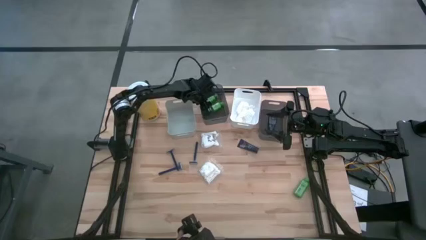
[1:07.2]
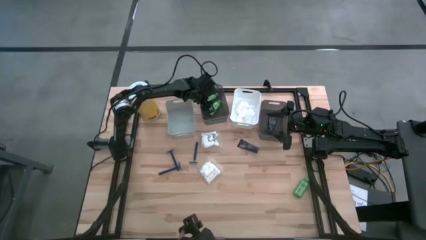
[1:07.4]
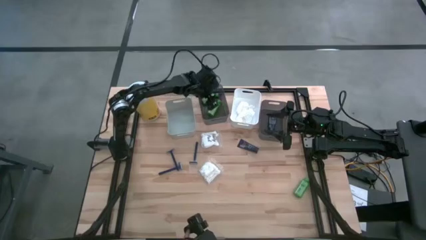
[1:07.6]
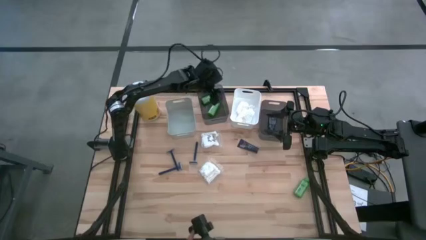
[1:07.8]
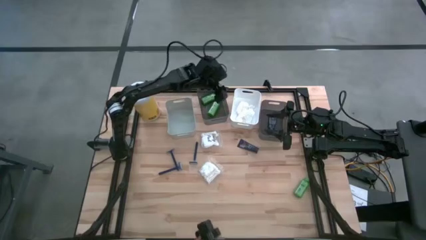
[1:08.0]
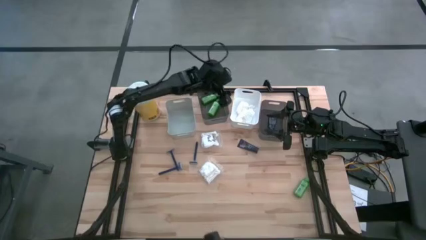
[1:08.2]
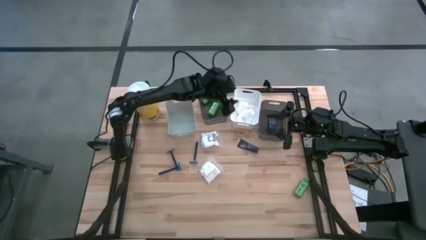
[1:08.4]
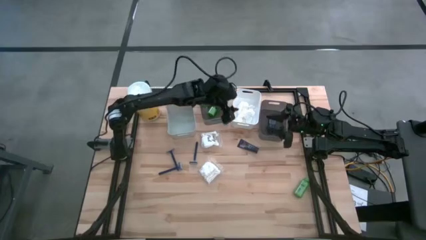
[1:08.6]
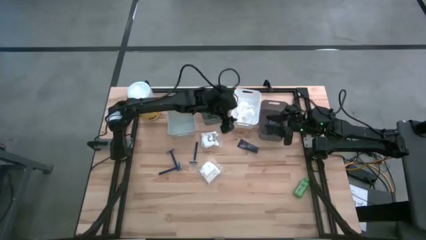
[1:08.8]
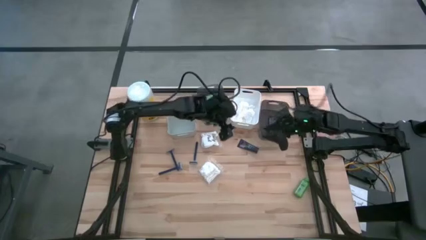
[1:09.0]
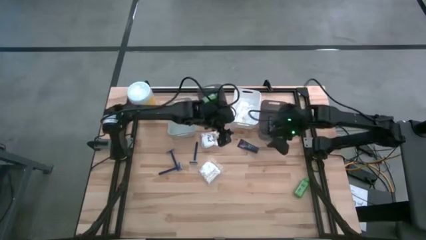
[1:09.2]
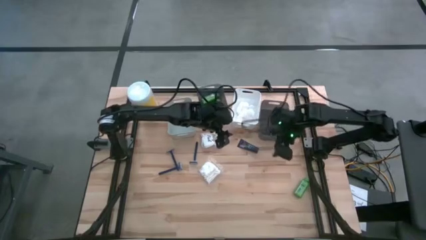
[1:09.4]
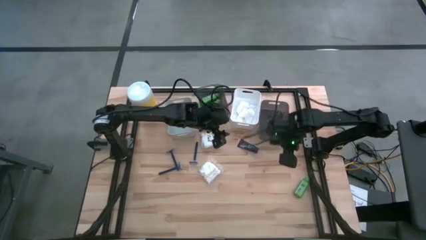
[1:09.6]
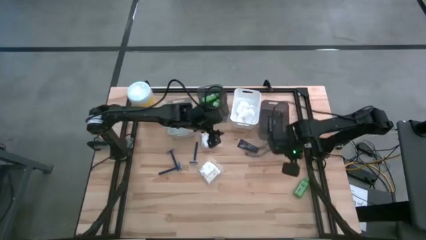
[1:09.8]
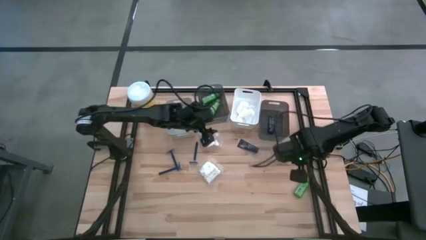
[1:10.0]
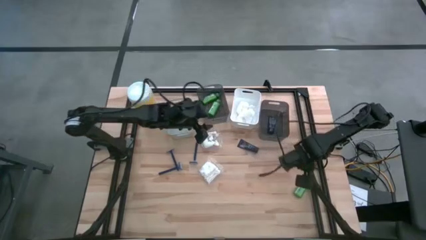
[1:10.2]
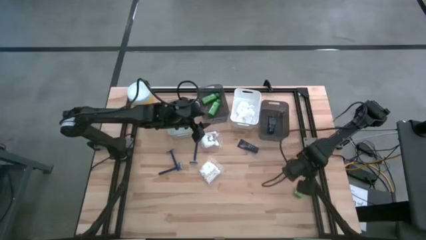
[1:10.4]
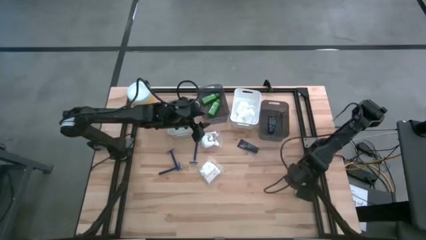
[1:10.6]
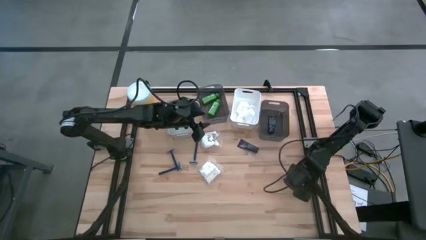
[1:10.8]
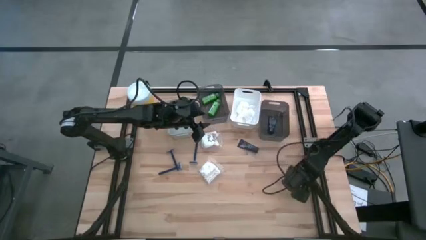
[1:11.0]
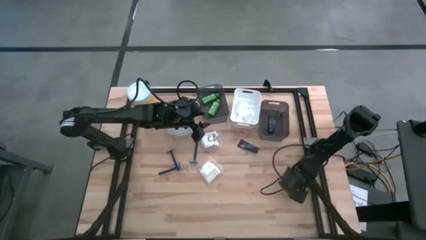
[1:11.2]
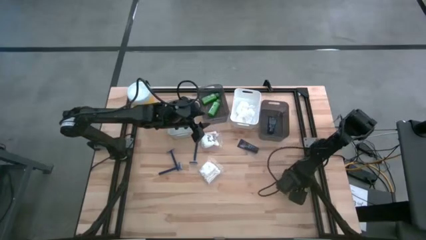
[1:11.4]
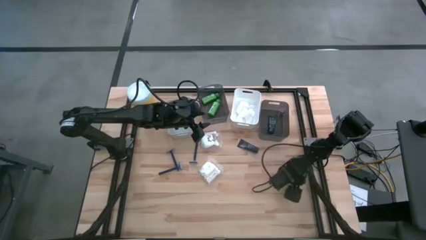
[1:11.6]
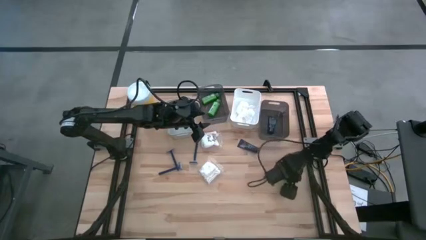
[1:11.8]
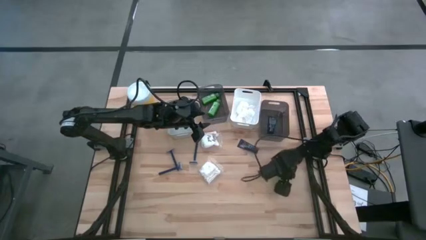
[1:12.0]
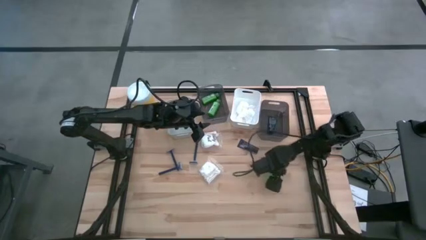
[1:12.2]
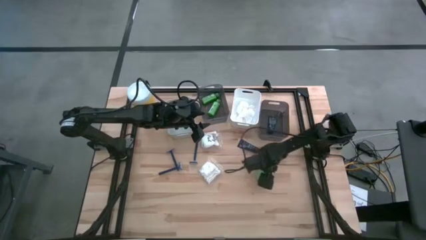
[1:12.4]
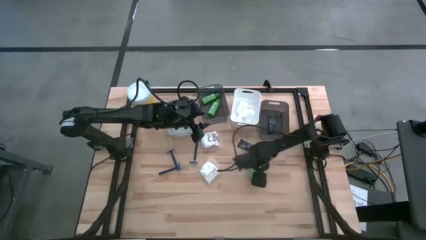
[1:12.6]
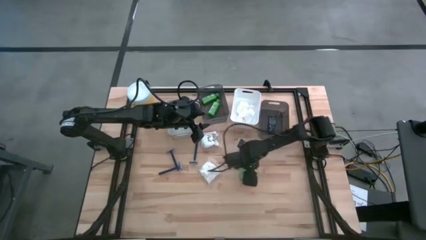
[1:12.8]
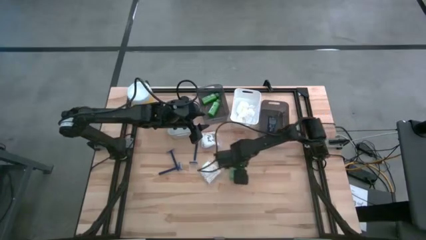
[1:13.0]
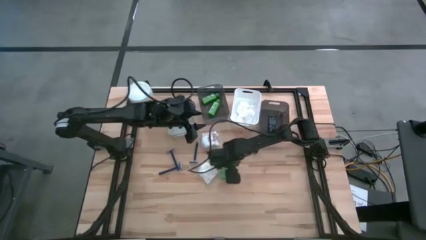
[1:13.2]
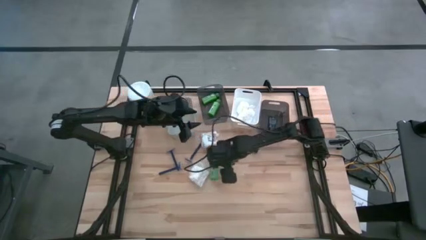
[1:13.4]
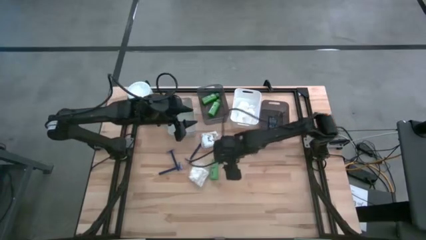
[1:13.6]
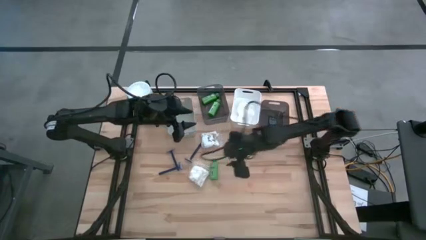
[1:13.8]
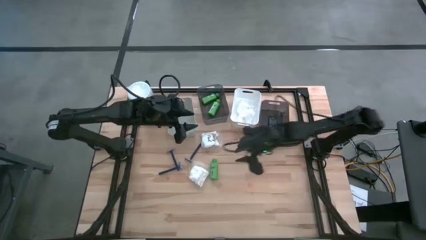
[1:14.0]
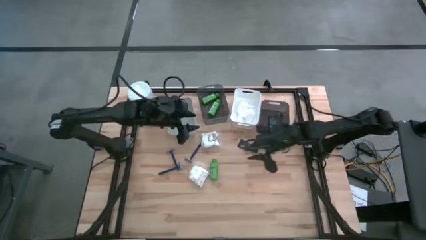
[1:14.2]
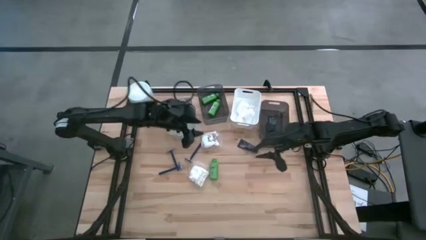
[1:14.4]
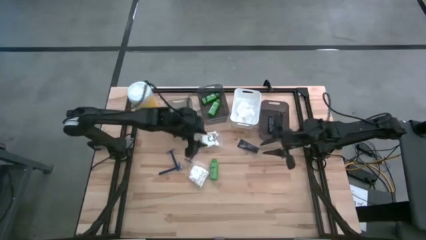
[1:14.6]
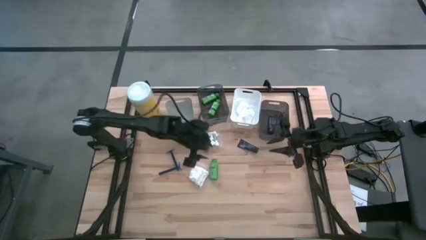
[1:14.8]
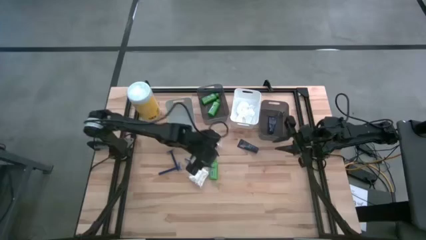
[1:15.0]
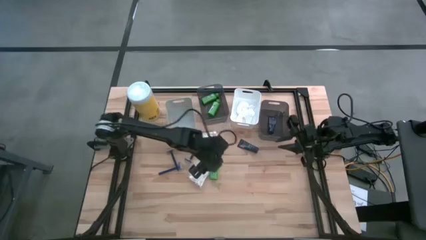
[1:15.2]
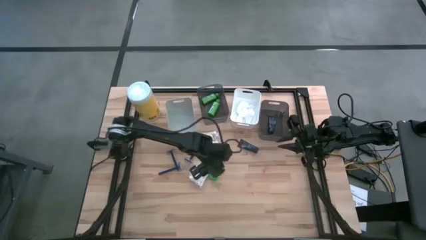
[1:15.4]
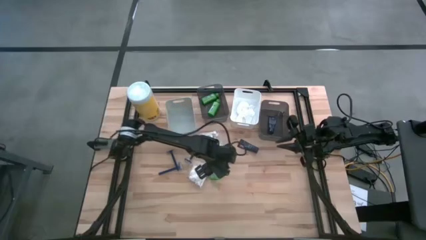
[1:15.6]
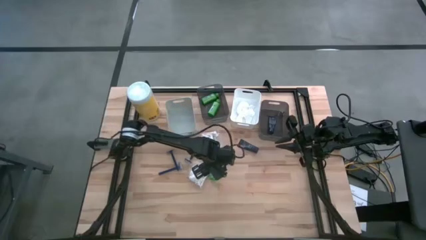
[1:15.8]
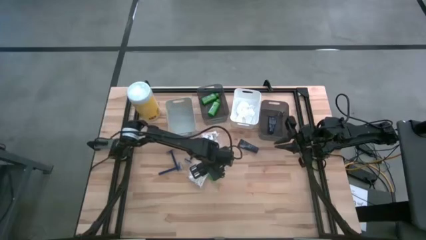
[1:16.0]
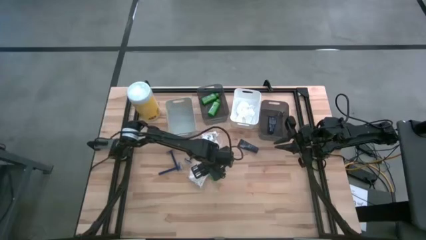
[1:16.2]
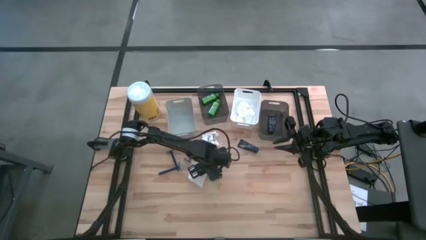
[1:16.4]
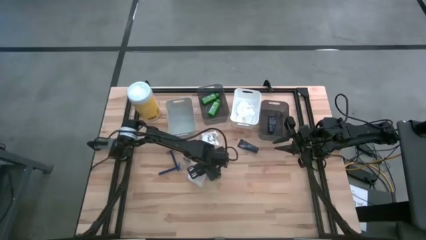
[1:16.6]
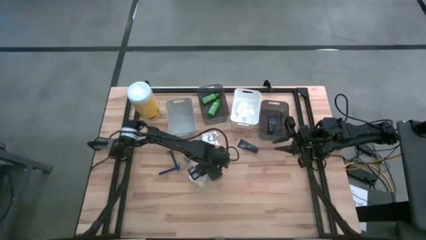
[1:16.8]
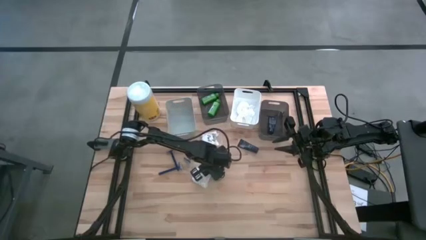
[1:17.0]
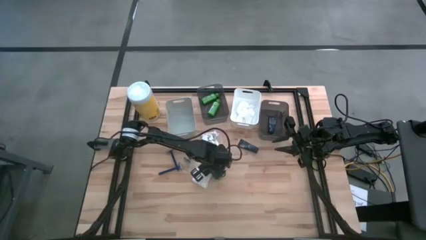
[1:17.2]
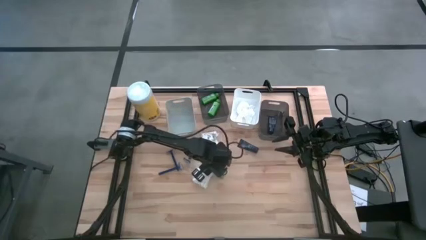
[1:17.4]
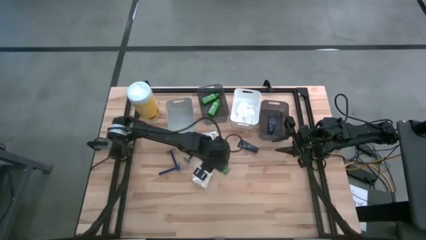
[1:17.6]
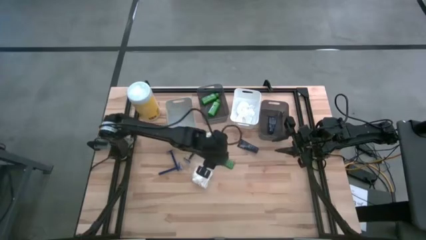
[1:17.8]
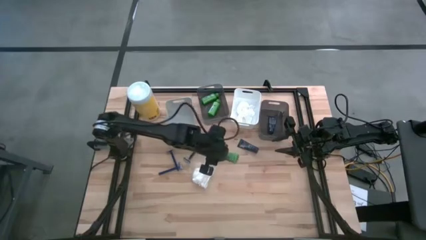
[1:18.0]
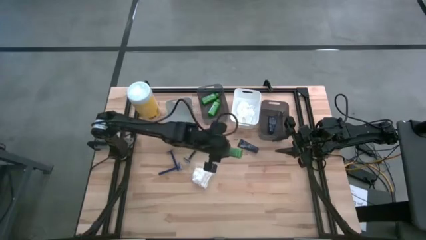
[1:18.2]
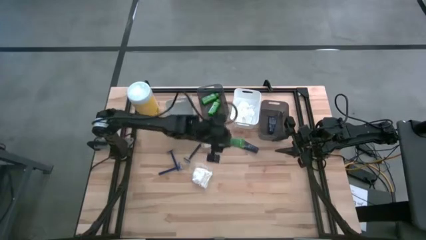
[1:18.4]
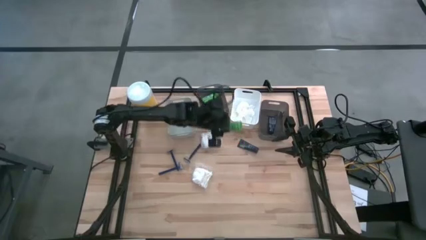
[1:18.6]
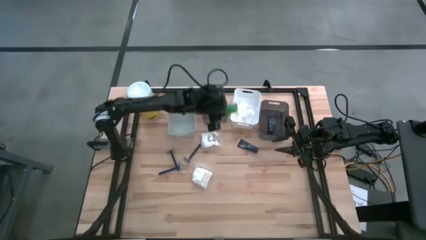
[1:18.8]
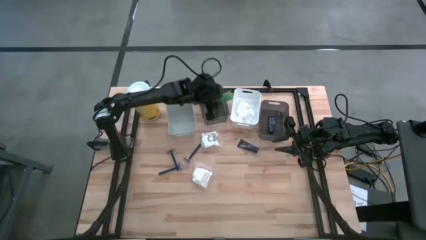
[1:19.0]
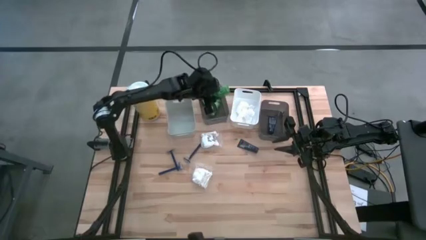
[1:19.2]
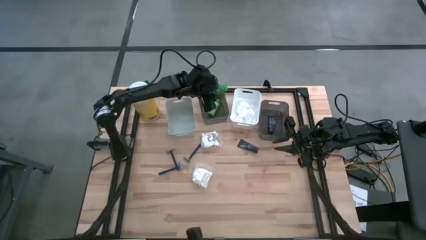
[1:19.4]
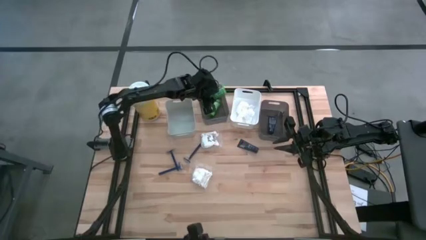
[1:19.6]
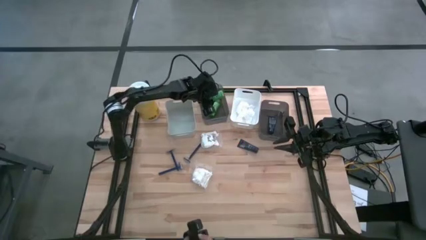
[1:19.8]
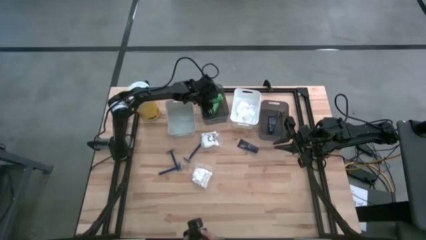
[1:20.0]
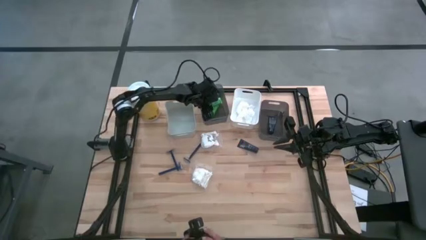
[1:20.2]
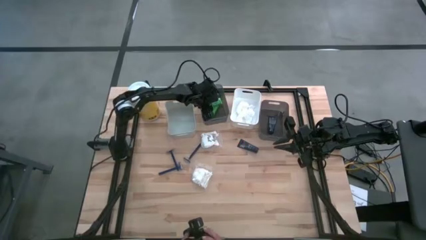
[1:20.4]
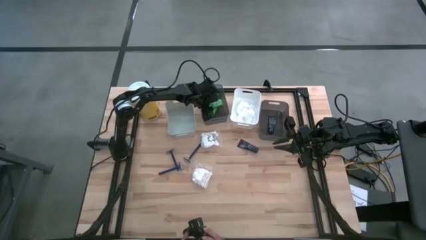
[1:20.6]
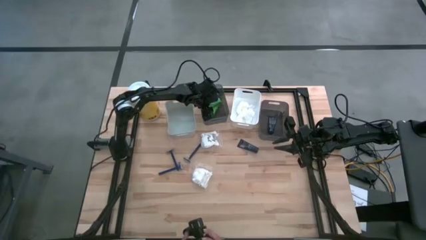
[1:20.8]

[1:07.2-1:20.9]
Task: Pick & Place Travel size toiletries
Put the green shampoo into the left black bin

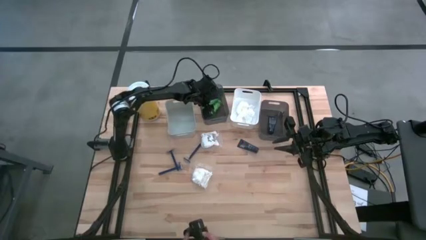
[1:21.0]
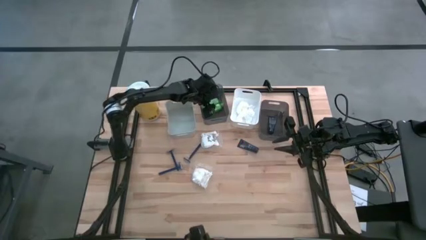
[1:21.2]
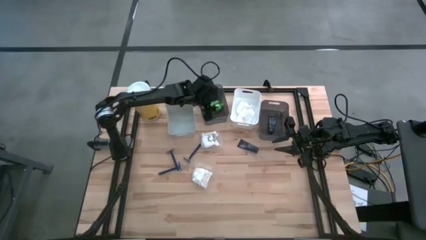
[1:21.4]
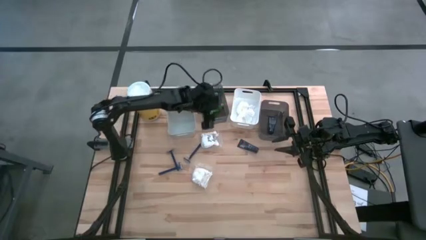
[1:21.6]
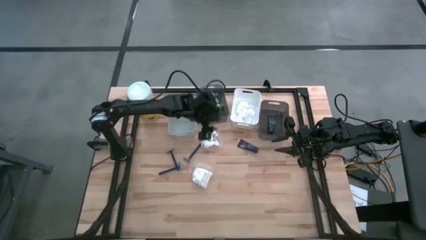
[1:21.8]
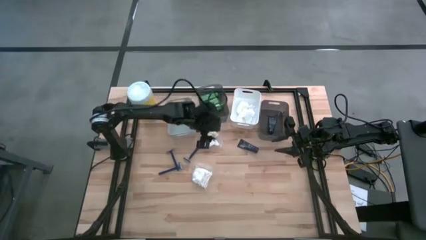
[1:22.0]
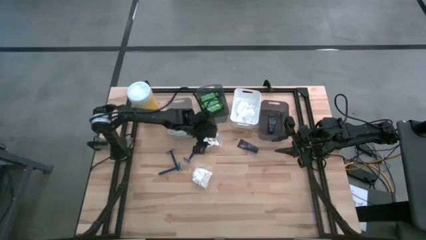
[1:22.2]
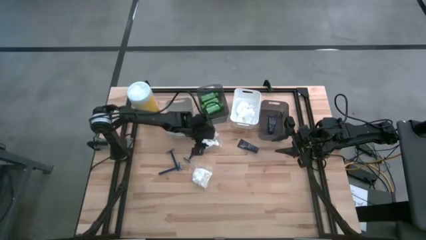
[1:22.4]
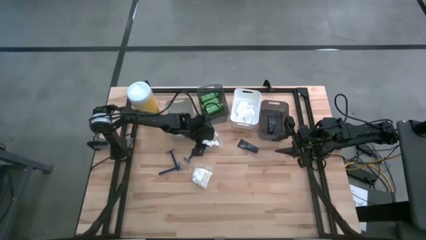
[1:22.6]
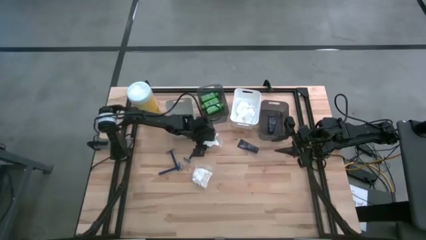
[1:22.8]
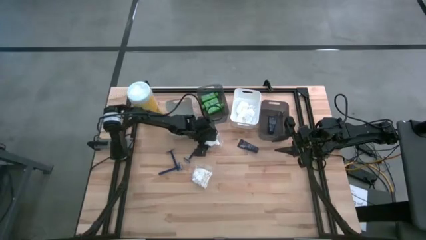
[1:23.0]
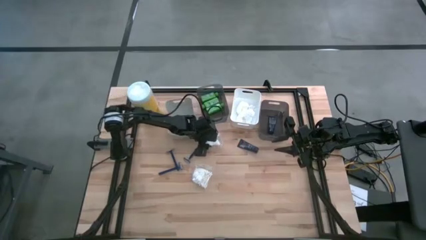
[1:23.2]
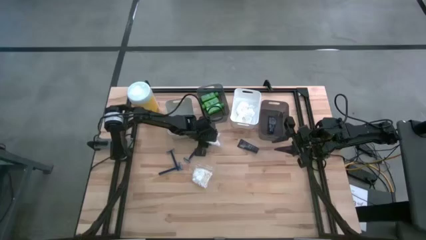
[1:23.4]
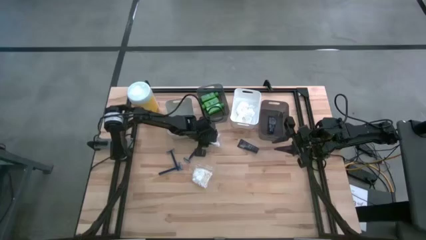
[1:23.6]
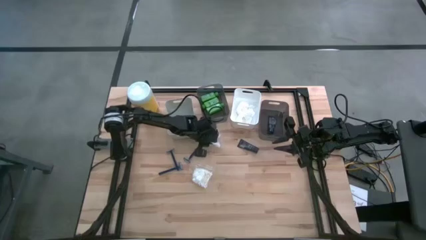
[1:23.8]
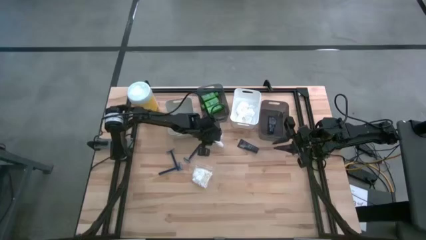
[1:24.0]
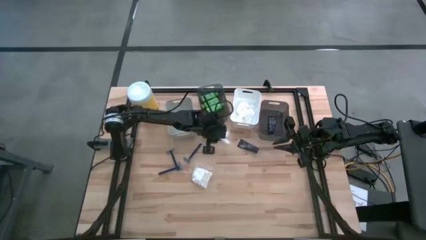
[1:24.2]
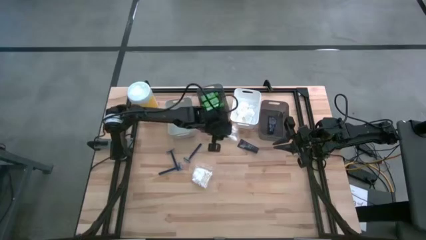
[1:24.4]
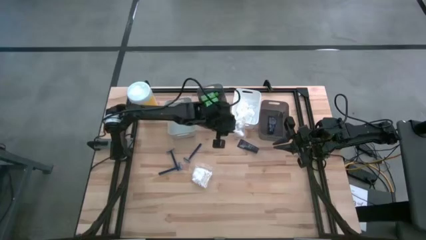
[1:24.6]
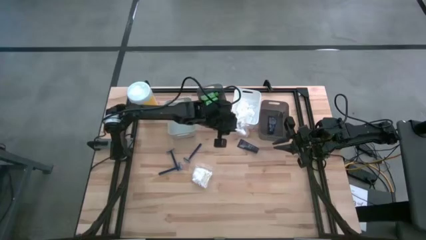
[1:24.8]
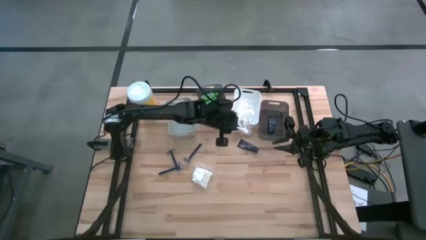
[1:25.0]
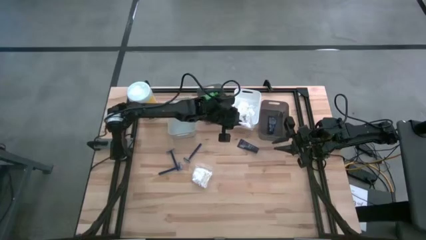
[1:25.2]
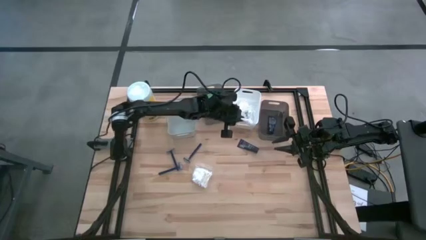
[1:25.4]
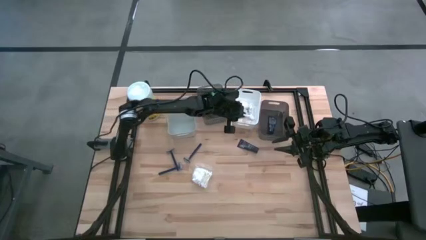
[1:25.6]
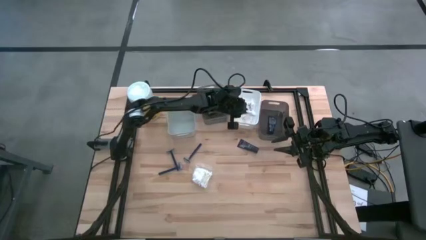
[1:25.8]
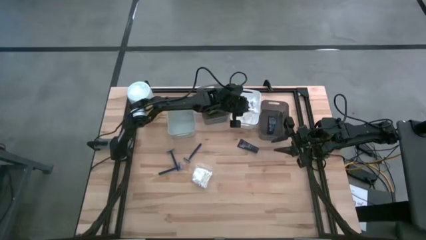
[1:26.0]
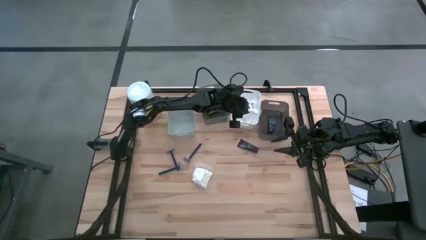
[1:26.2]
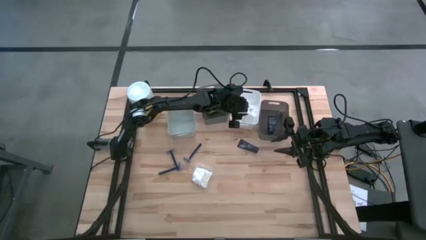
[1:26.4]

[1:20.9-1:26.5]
Put the white cotton pack into the white bin
